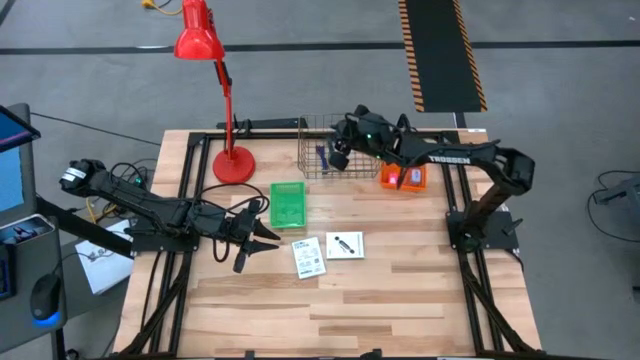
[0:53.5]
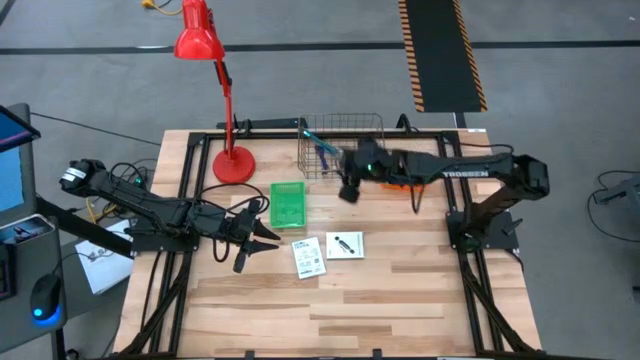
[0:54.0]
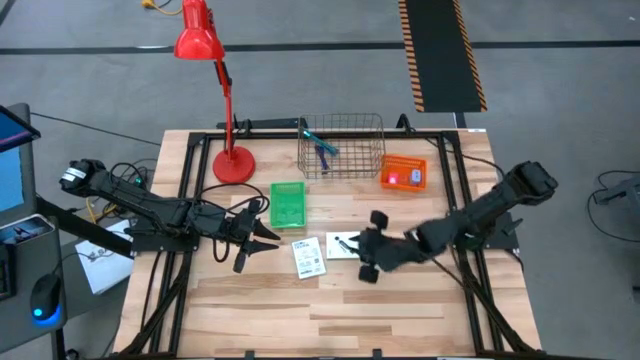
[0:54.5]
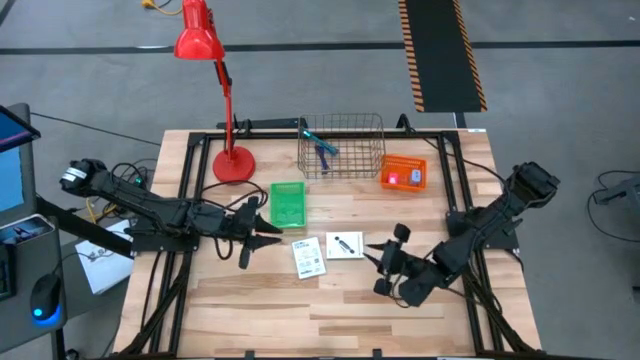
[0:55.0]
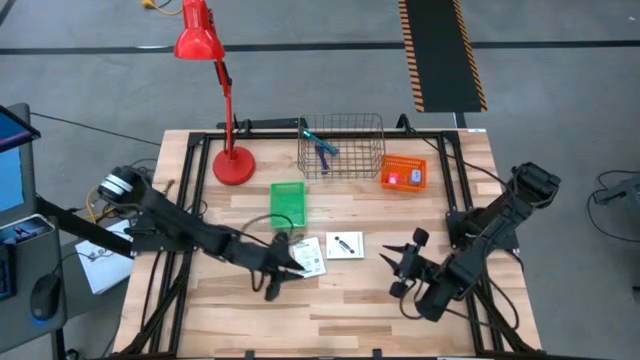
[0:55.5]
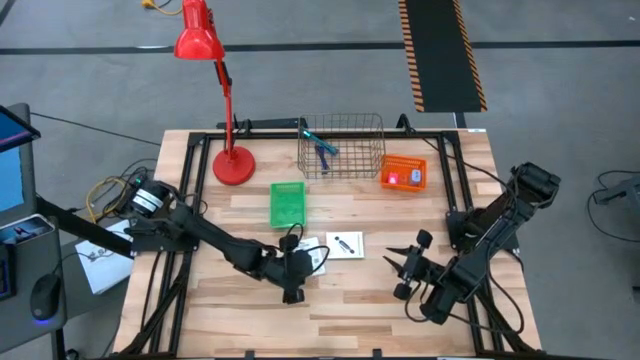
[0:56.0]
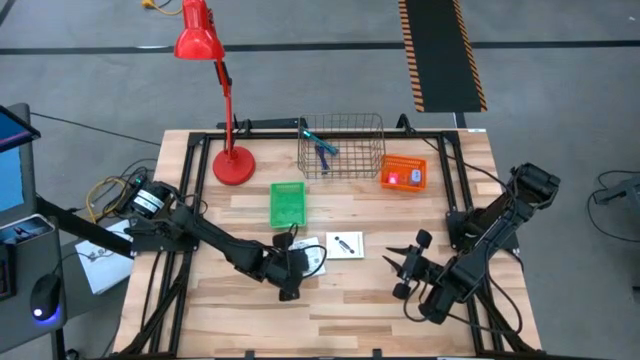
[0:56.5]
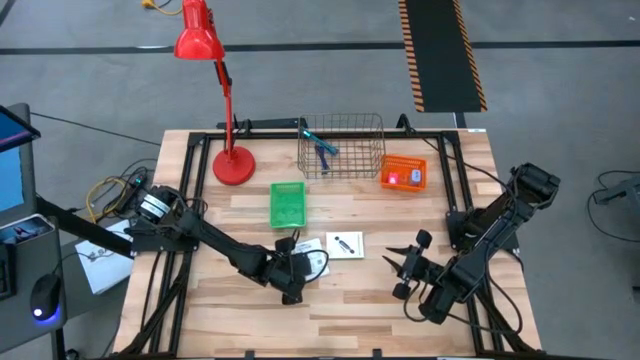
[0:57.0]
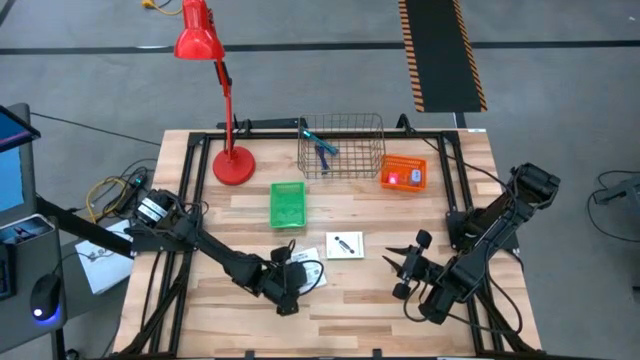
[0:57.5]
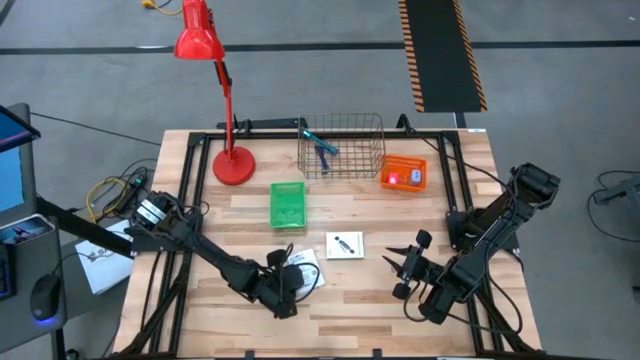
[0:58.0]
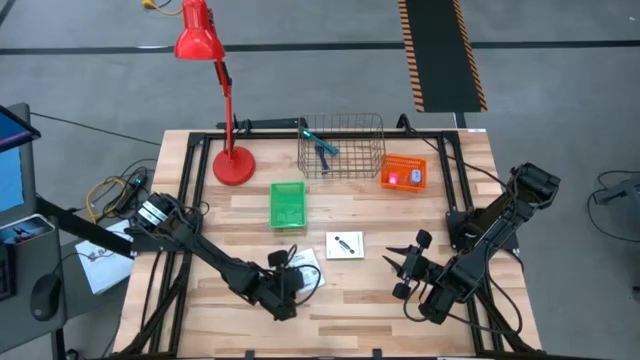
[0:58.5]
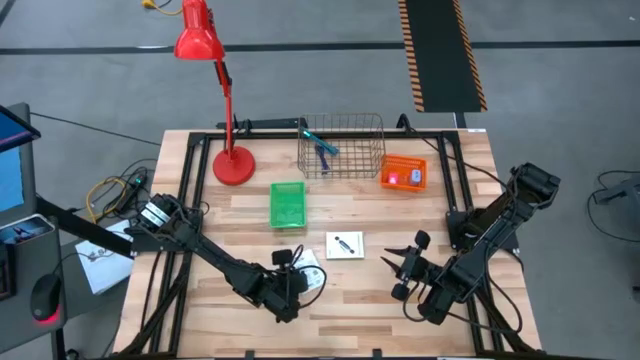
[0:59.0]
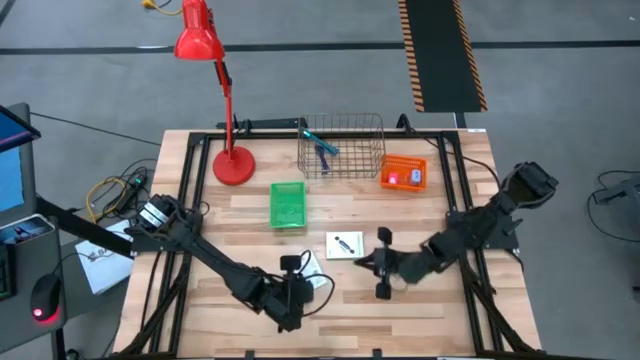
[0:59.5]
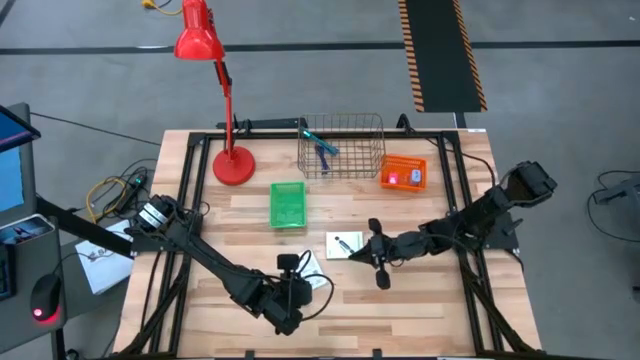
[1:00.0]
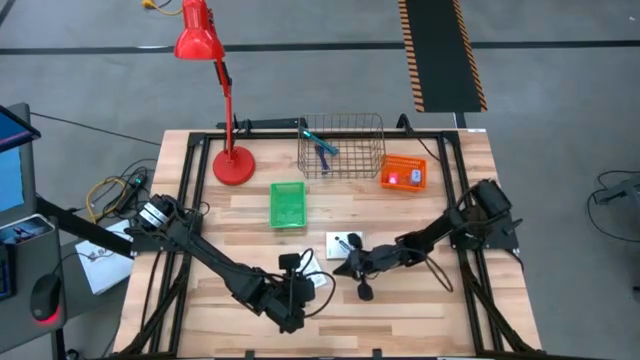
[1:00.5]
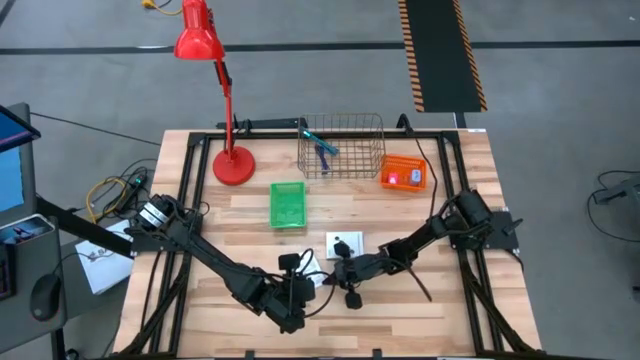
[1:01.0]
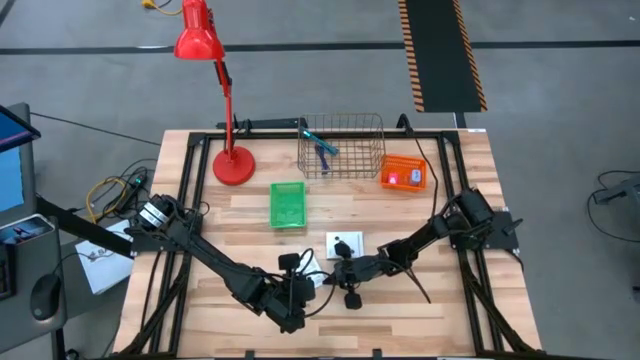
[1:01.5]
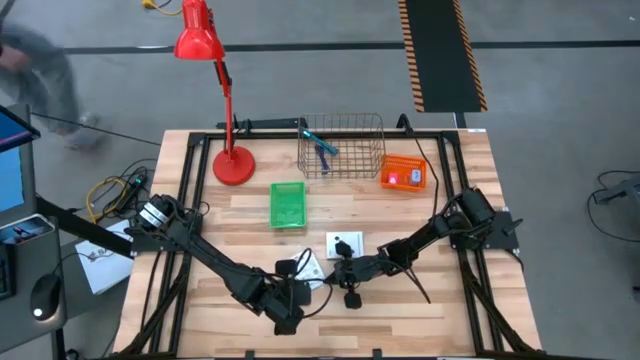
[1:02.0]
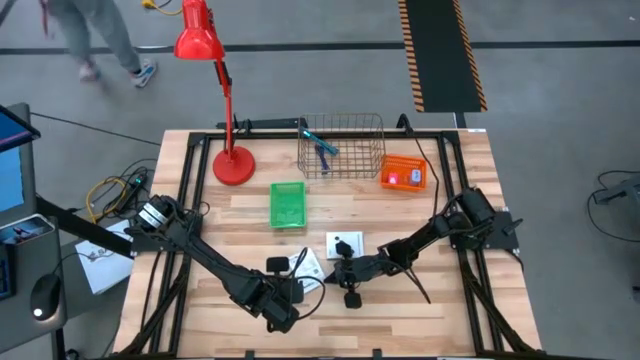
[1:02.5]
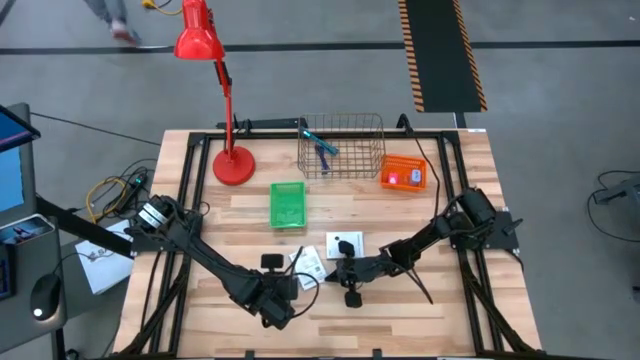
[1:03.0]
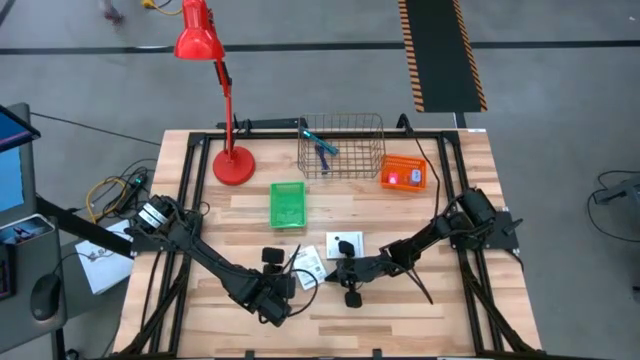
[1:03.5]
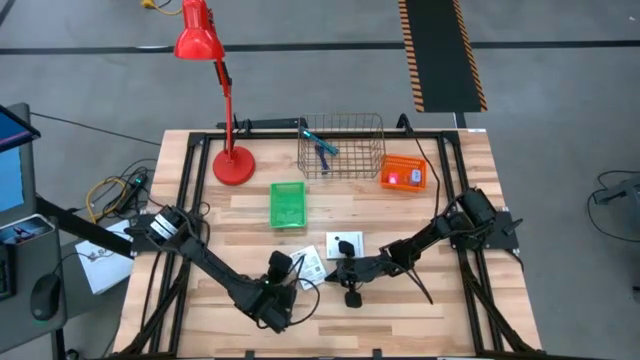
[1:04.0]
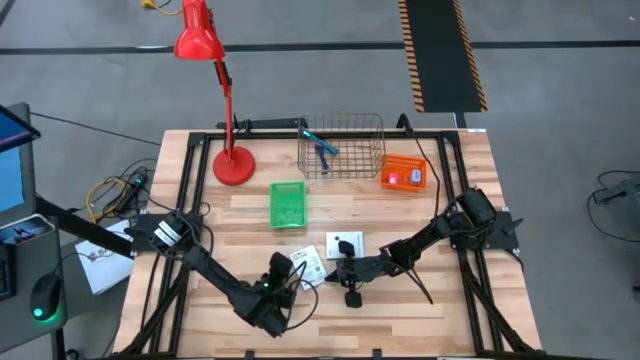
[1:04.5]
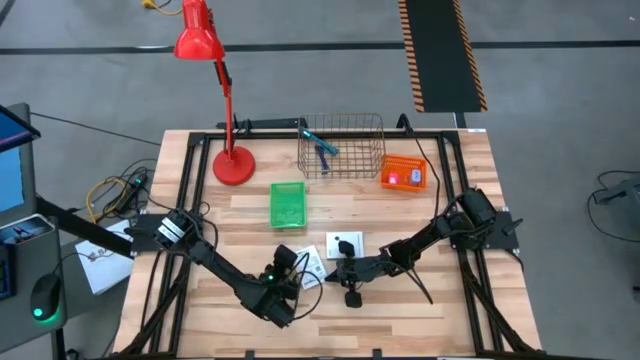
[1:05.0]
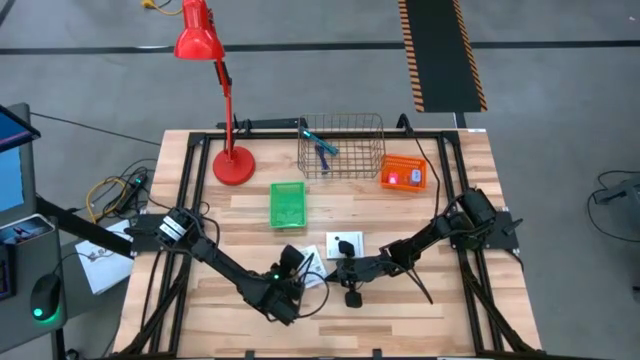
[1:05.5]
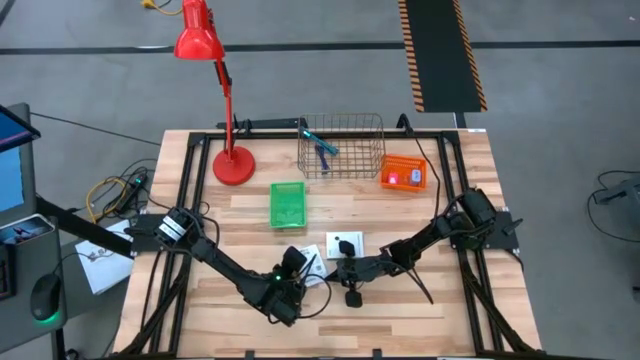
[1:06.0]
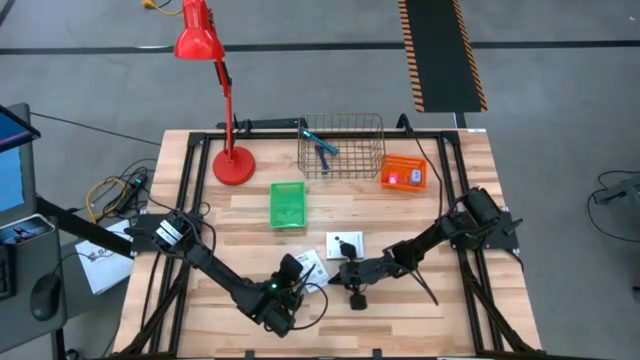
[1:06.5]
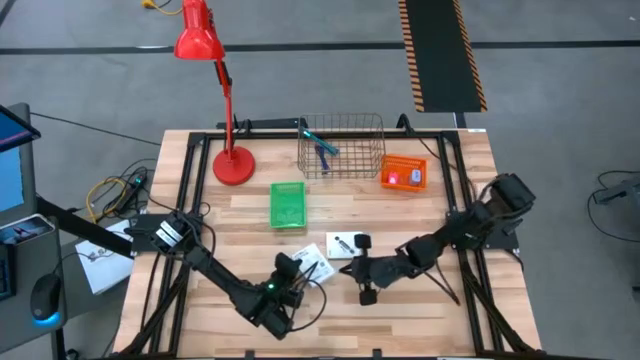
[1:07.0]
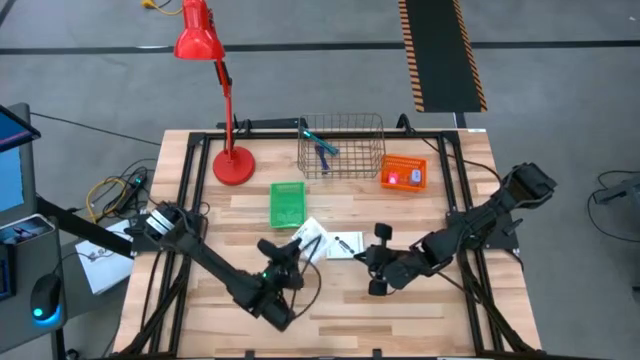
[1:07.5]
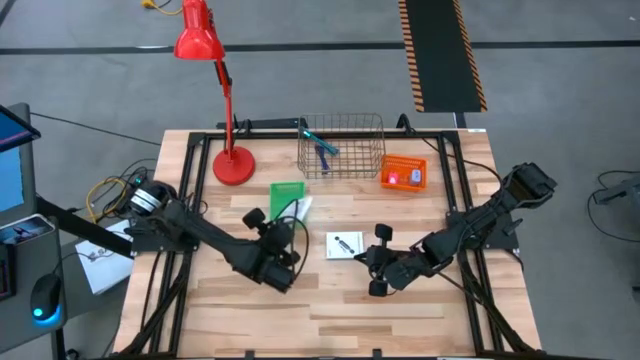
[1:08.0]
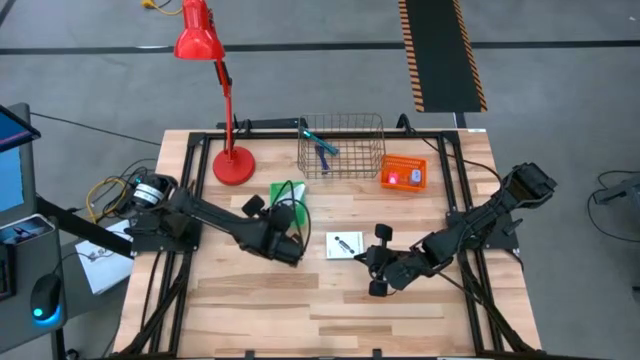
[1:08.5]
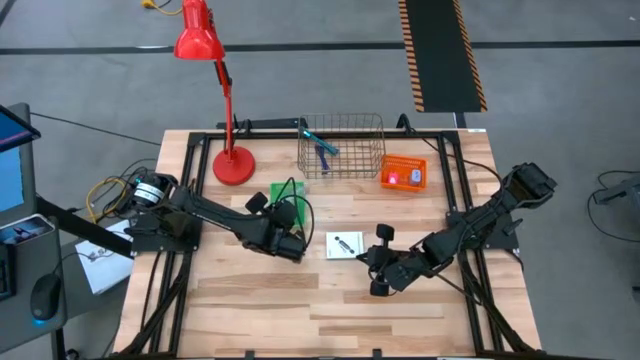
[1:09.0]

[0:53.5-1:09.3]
Task: Pick and place items into bin
Put the left card reader box into the green basket
